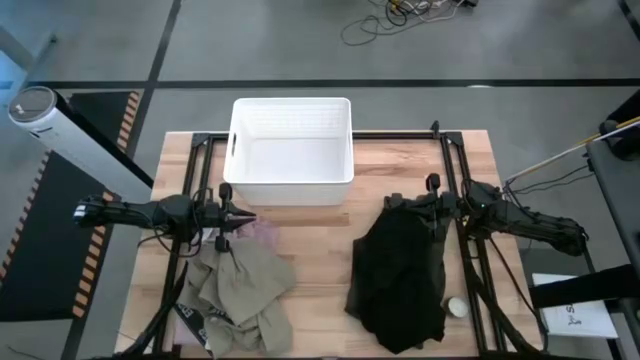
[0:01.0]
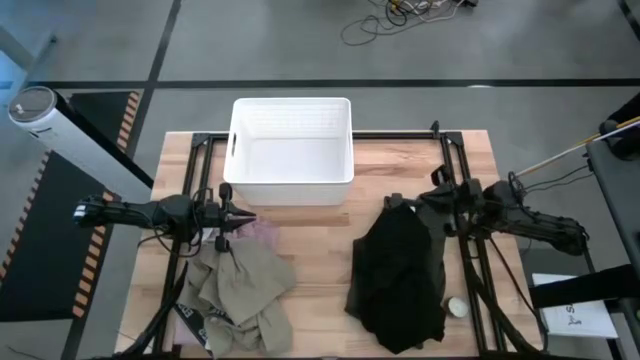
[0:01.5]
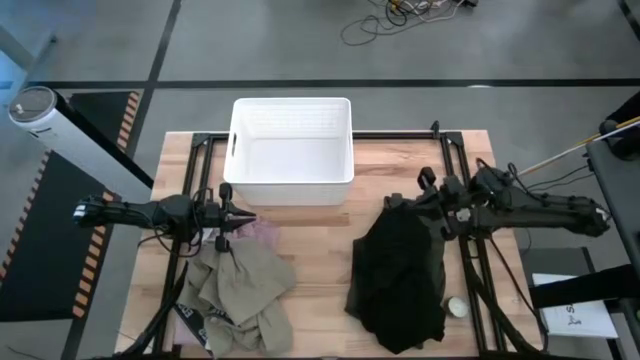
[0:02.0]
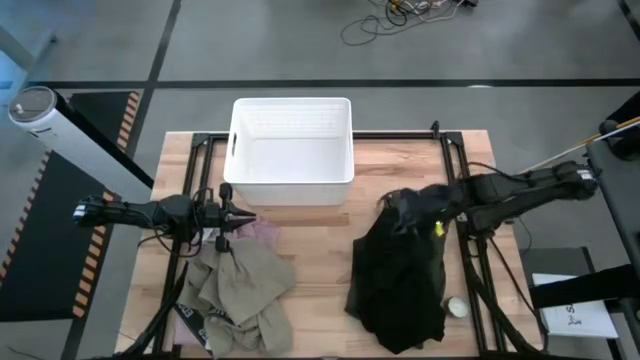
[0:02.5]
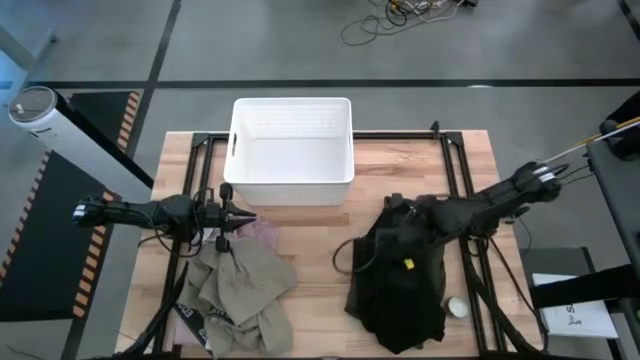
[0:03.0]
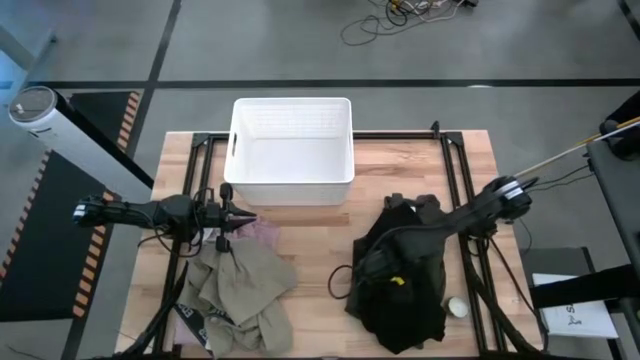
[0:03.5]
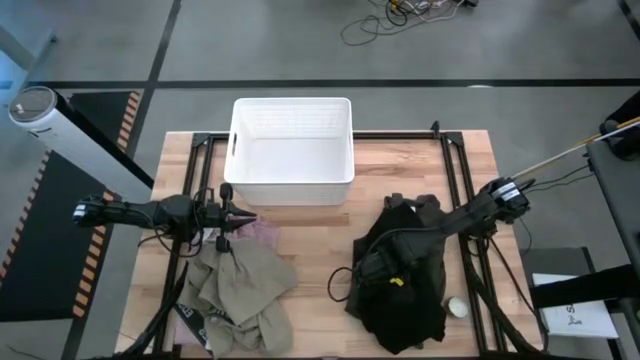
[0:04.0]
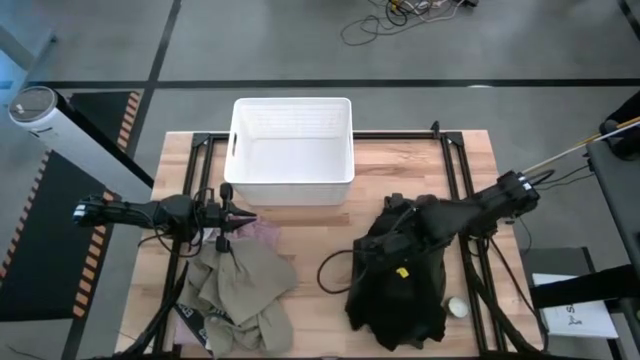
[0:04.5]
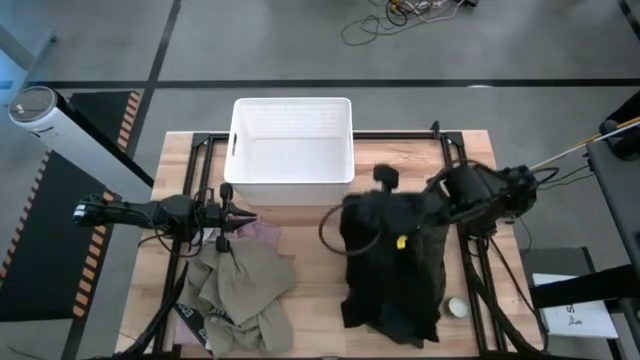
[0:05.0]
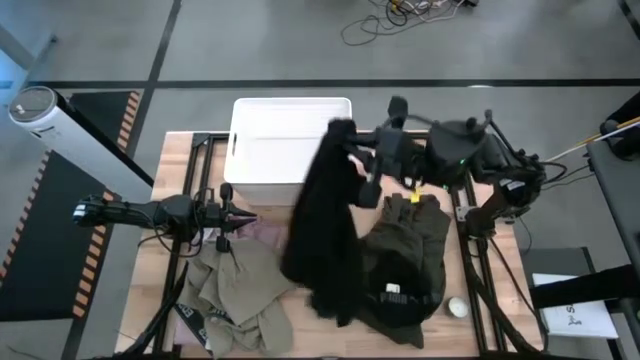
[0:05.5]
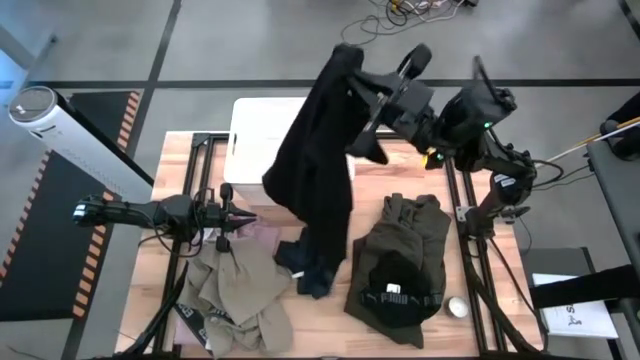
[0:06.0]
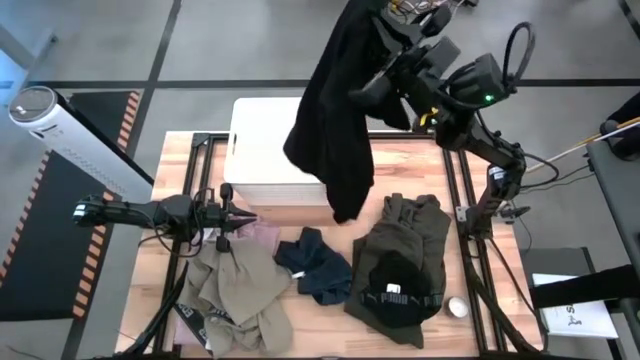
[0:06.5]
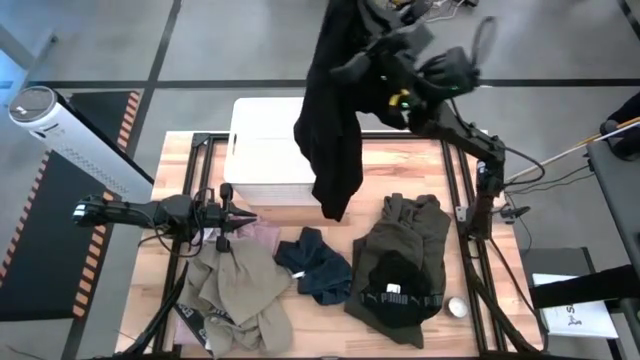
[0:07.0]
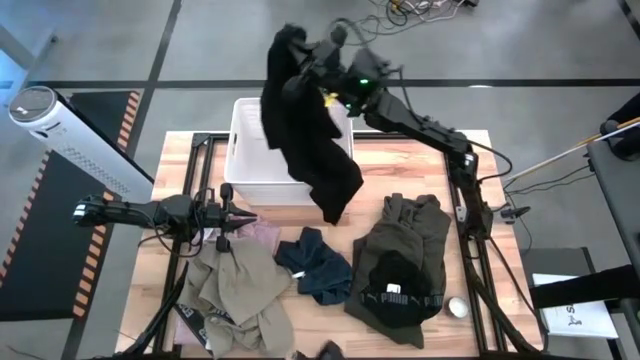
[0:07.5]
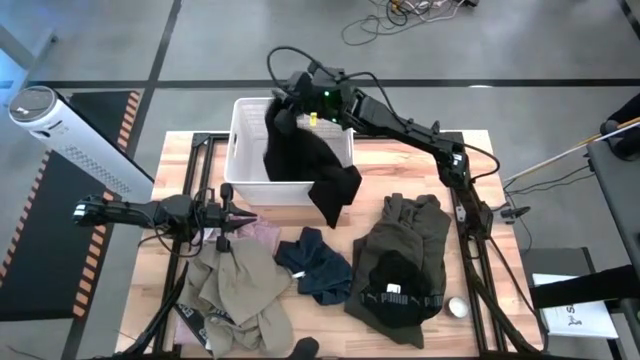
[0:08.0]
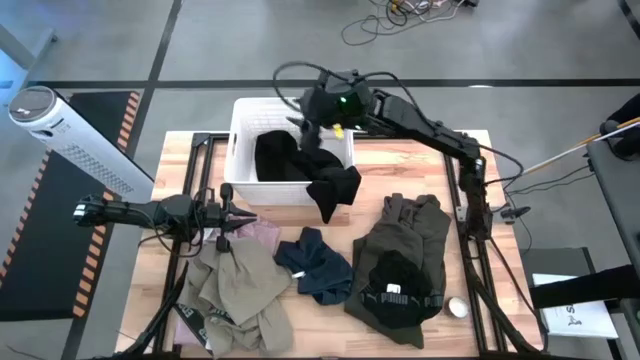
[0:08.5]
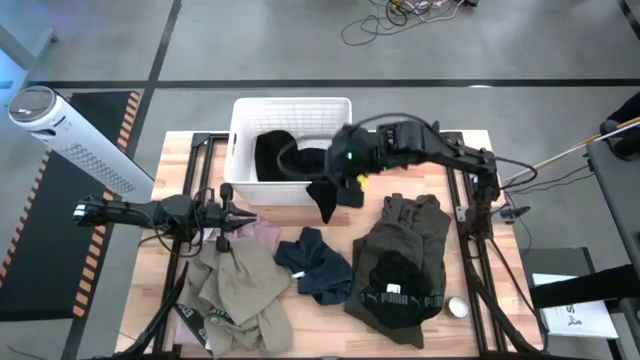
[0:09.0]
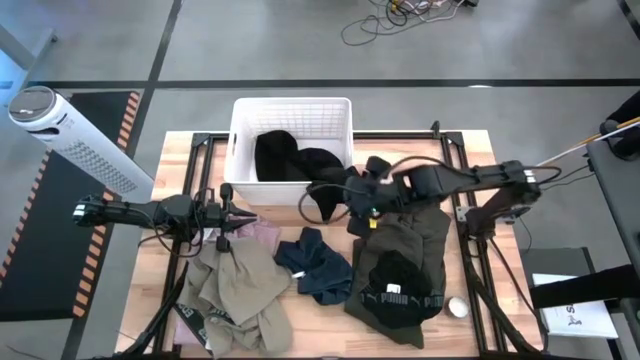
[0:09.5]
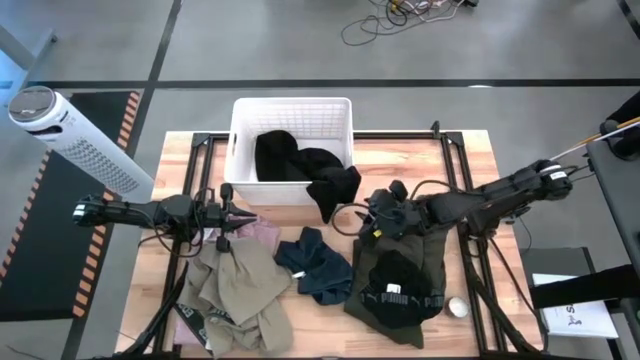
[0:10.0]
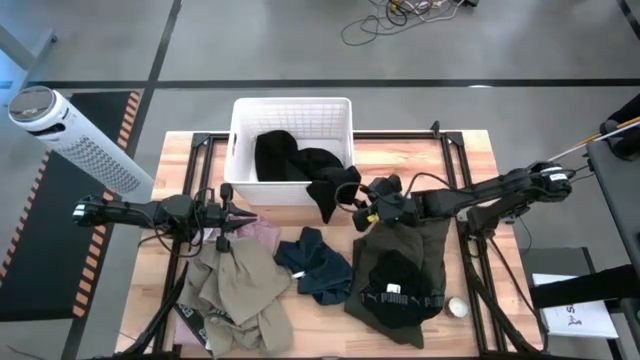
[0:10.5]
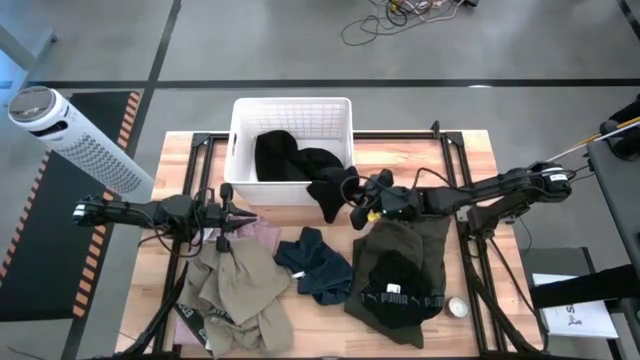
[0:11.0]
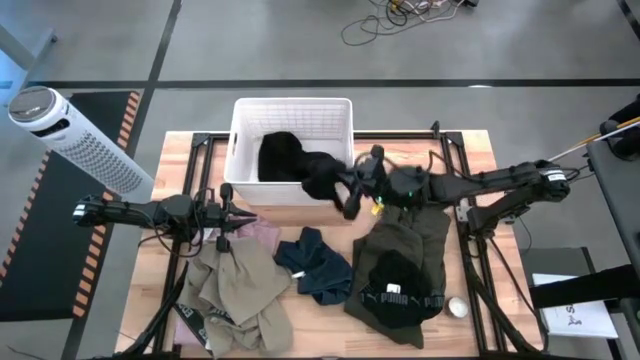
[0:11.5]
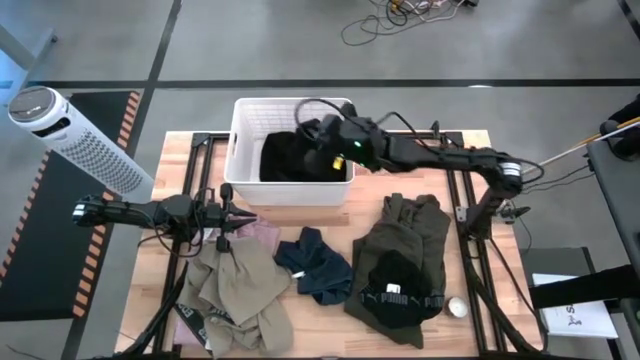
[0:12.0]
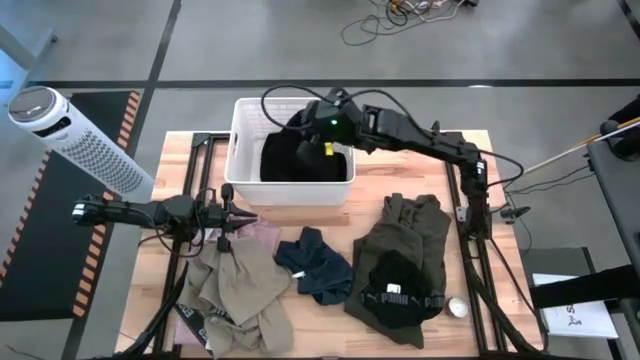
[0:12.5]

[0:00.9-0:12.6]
Task: Sort clothes
Put the black shirt into the bin

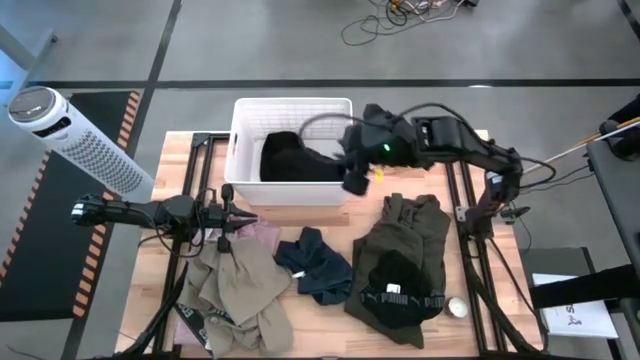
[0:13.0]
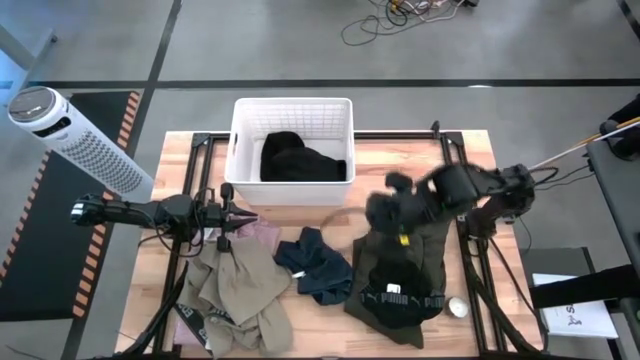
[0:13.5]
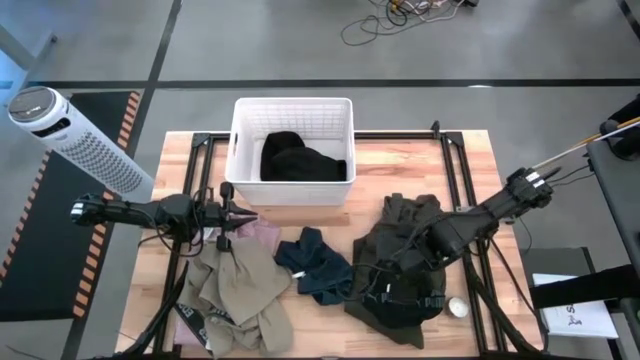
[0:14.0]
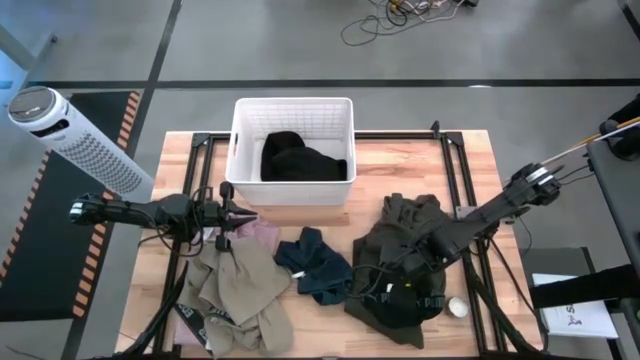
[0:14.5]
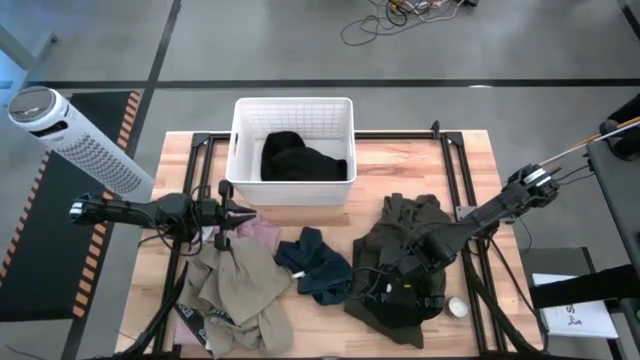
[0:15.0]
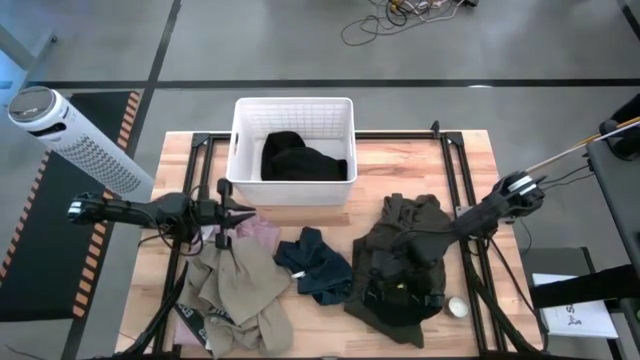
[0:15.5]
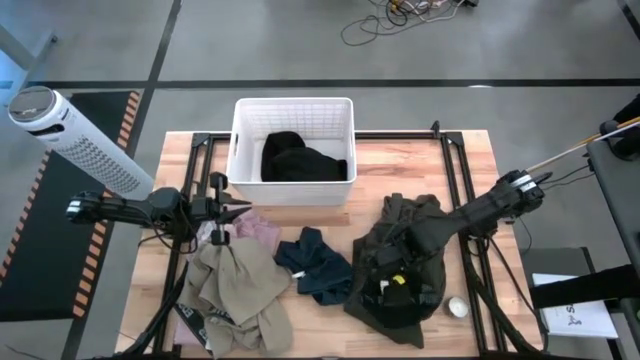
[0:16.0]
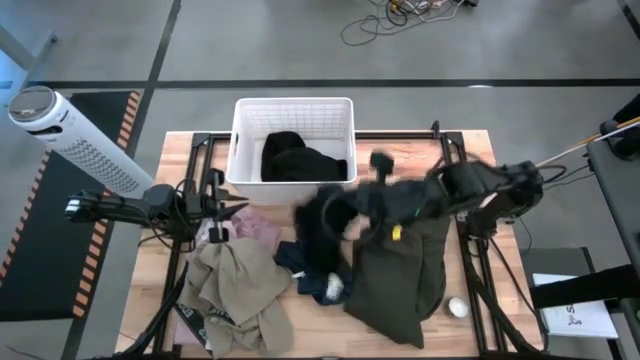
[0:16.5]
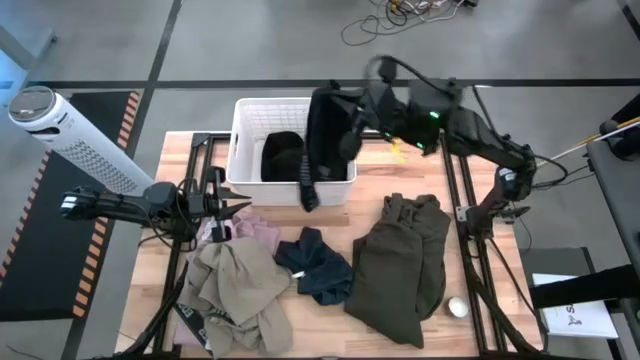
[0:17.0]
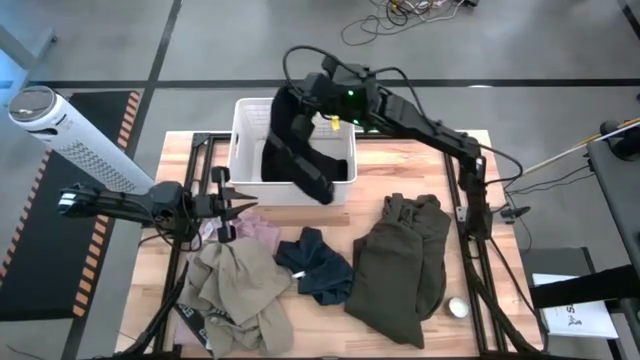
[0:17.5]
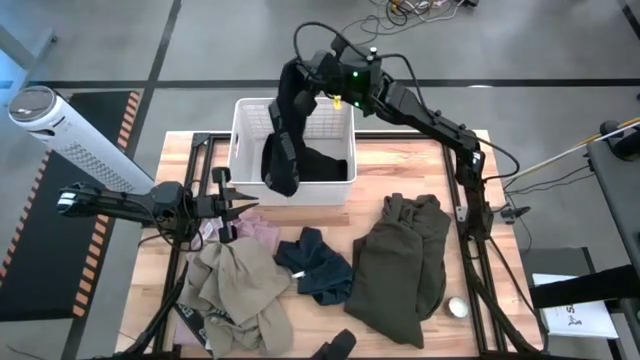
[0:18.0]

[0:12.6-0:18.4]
Put the boxer shorts into the bin

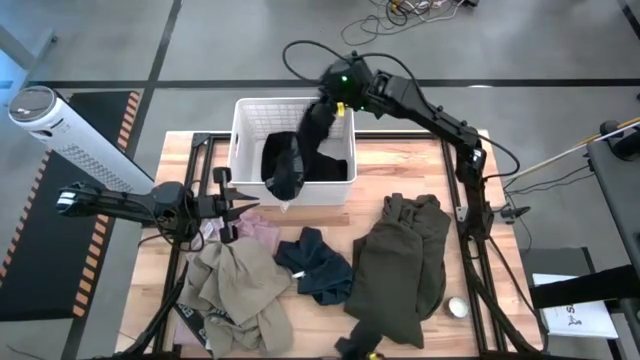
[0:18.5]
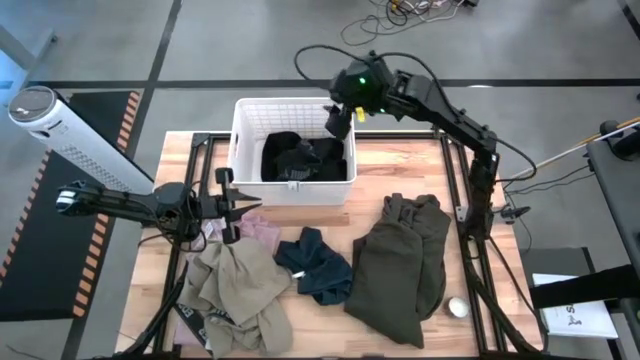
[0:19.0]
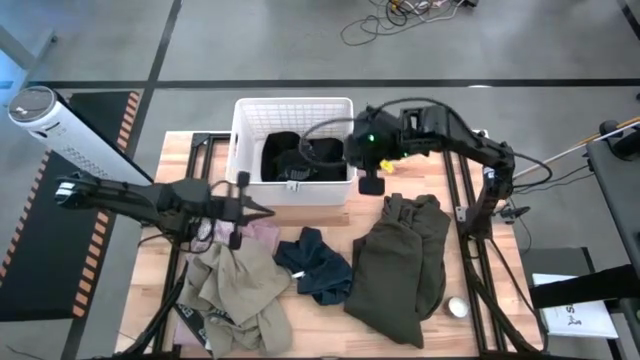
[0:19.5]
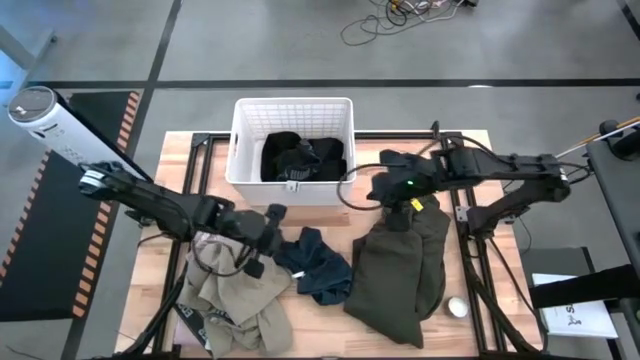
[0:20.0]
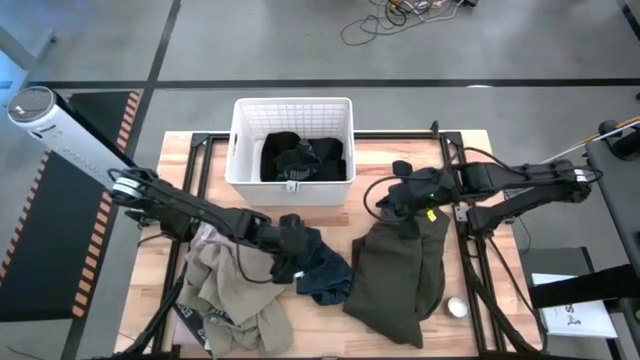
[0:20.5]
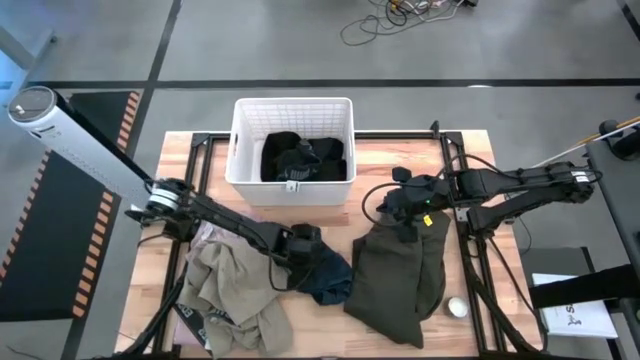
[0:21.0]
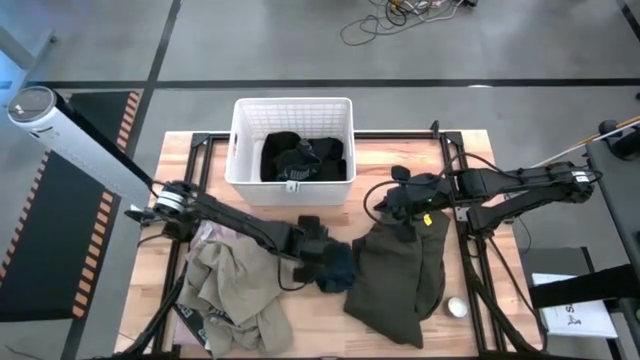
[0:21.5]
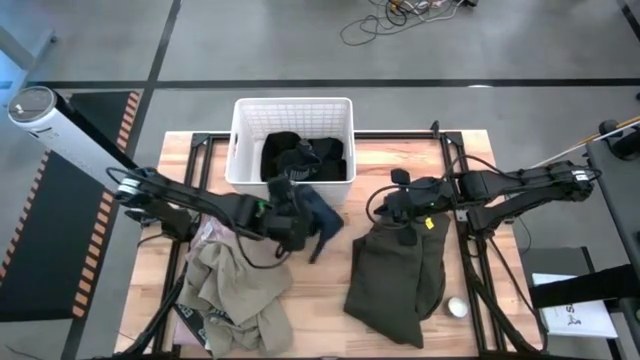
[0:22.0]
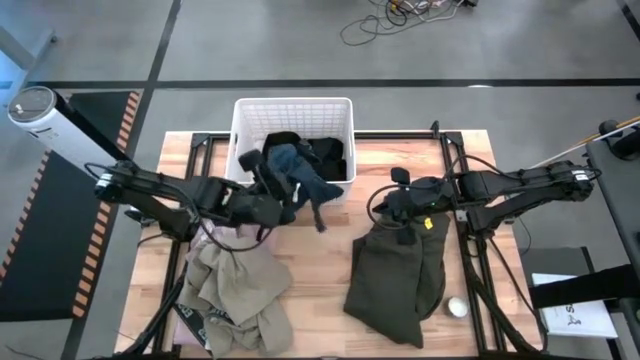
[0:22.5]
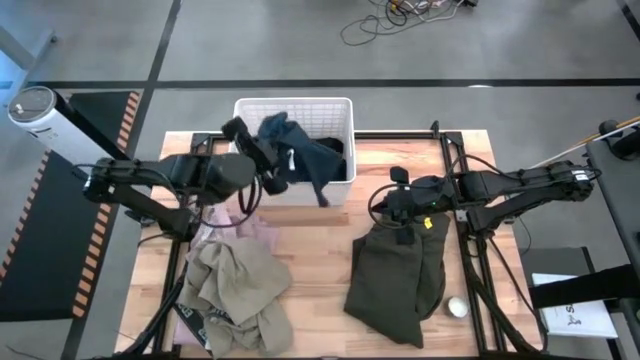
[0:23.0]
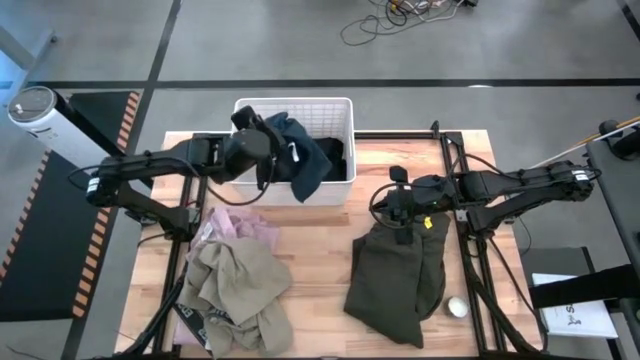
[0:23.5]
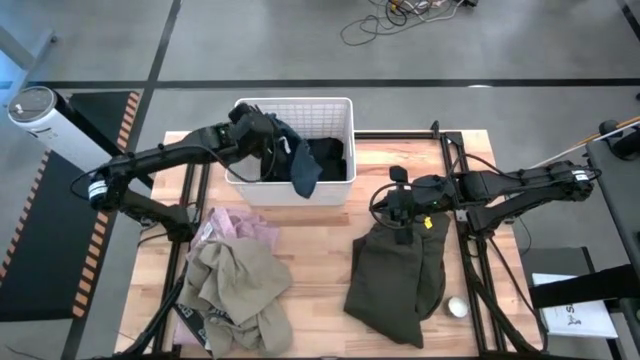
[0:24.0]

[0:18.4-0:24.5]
Put the blue shorts into the bin
